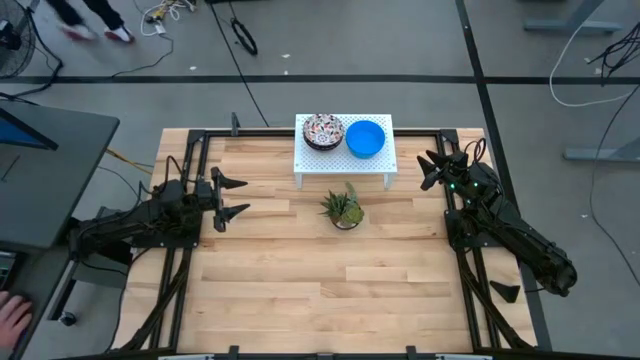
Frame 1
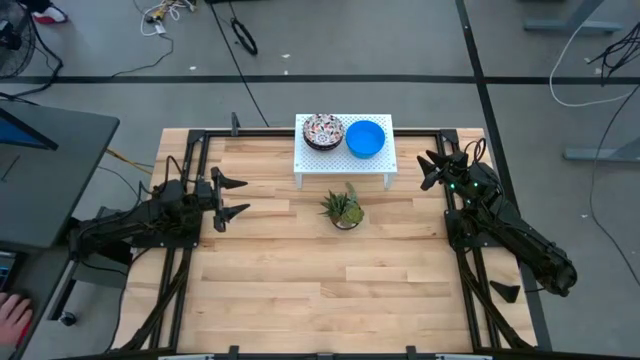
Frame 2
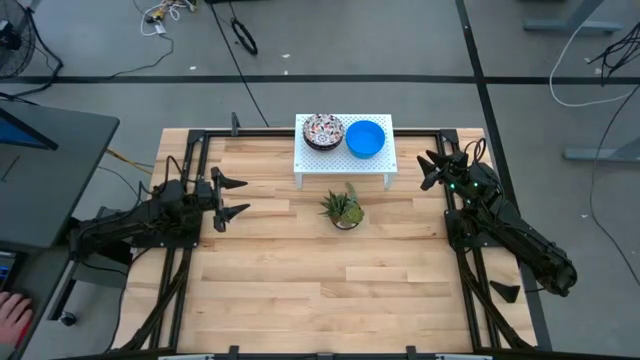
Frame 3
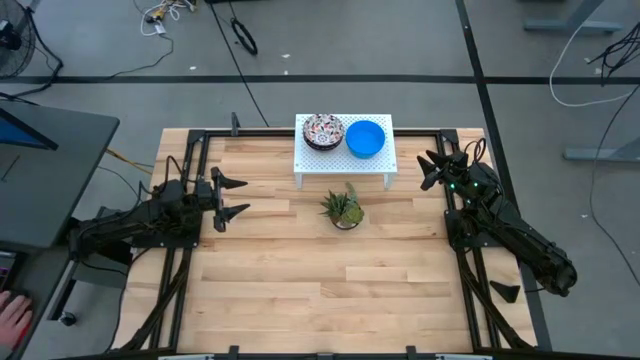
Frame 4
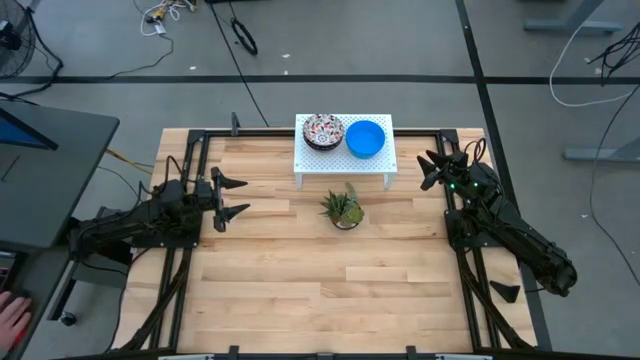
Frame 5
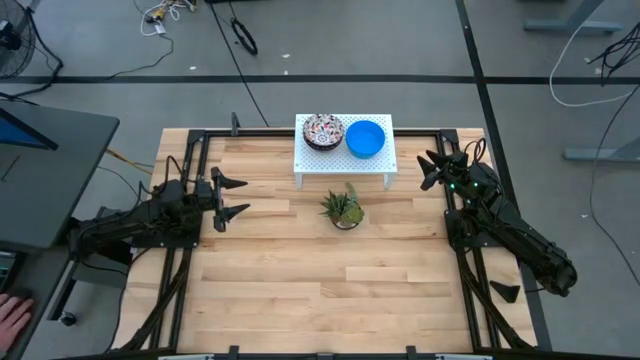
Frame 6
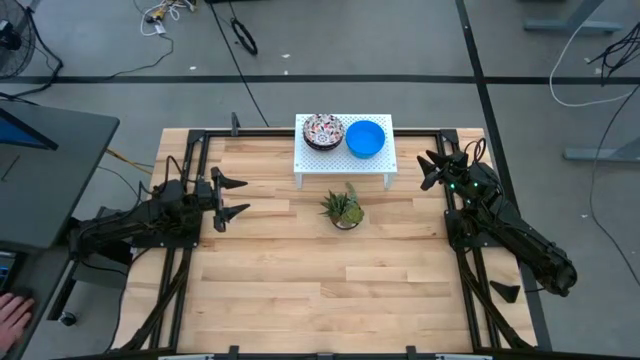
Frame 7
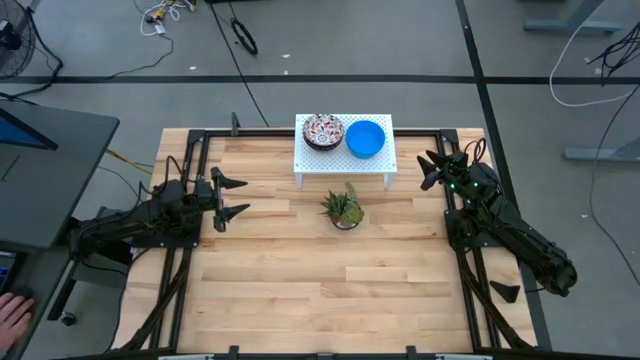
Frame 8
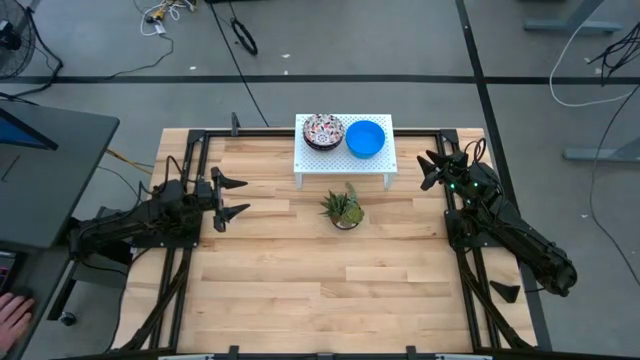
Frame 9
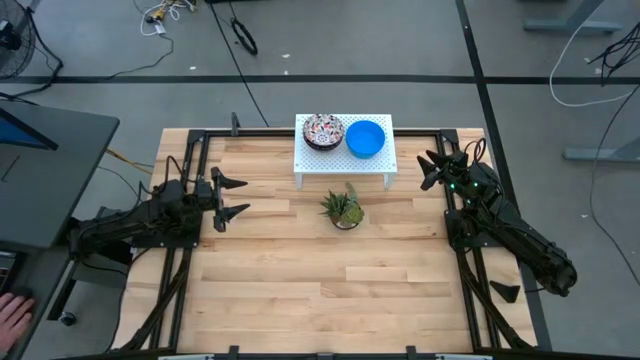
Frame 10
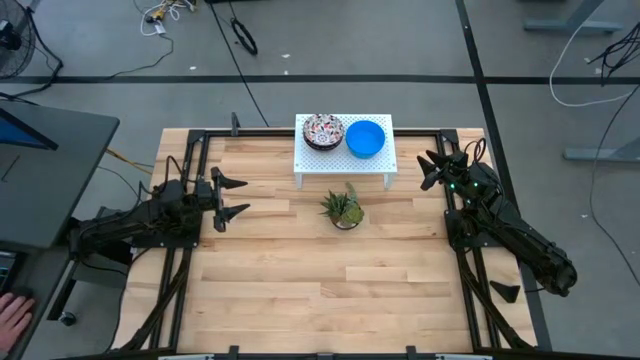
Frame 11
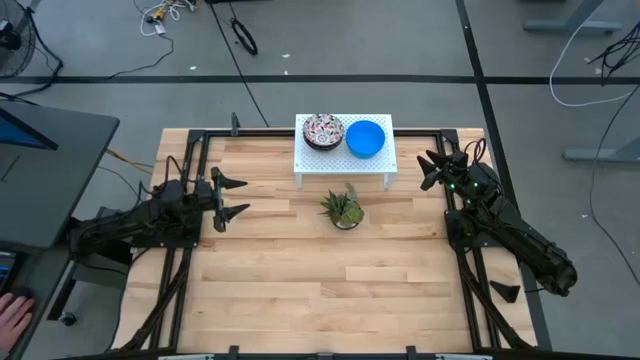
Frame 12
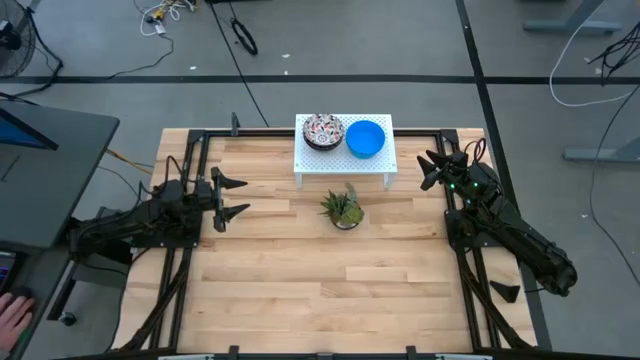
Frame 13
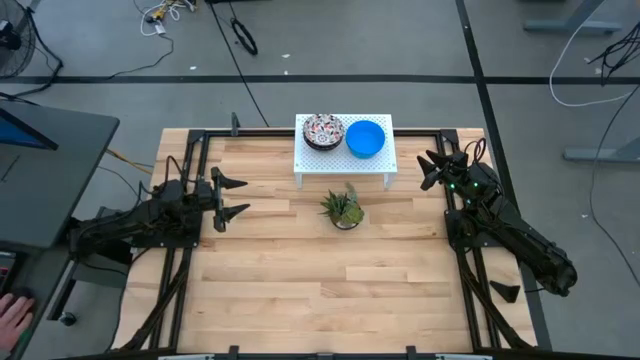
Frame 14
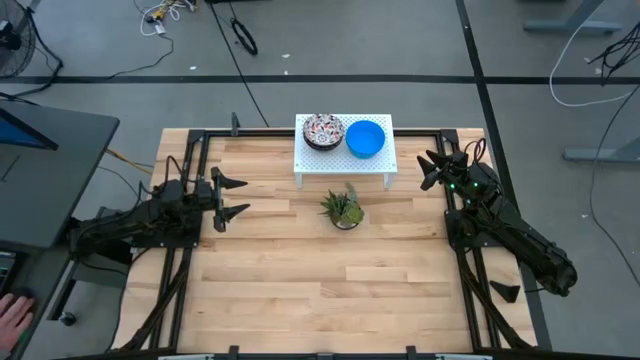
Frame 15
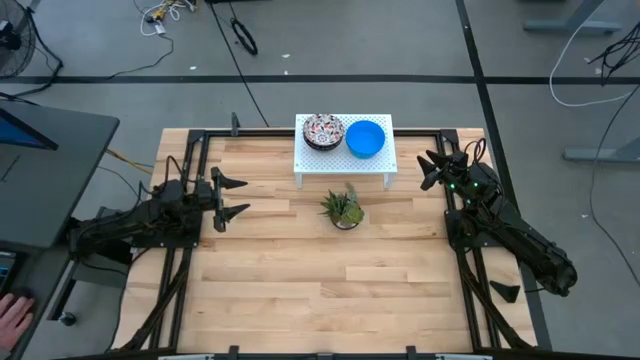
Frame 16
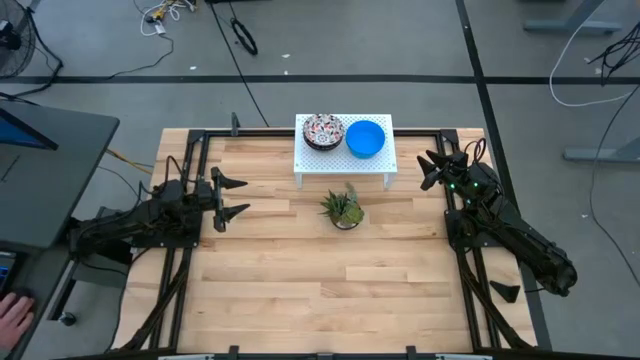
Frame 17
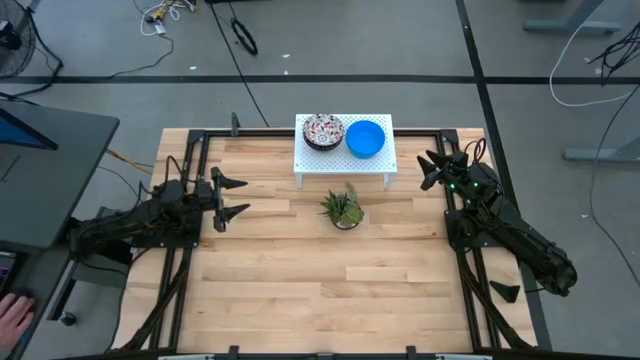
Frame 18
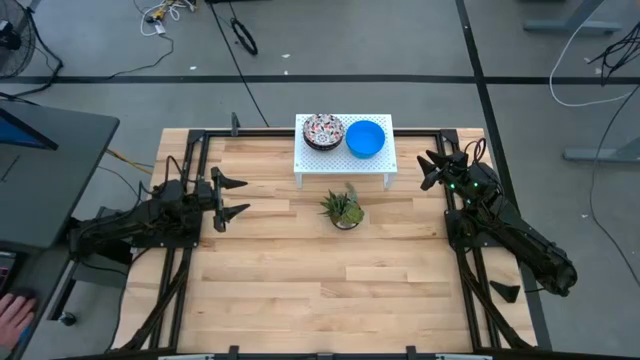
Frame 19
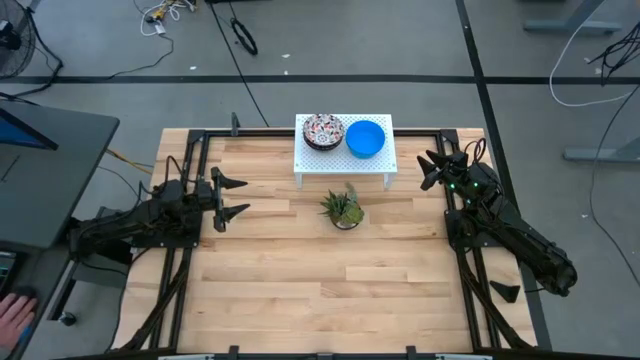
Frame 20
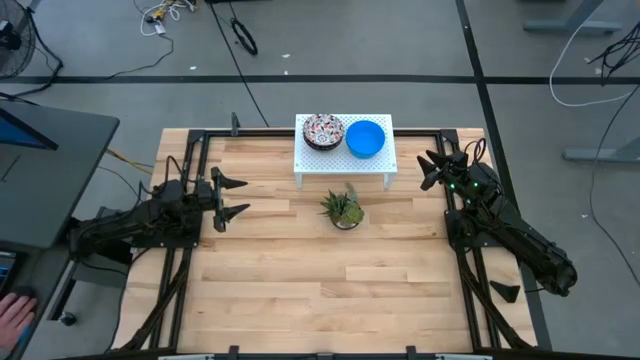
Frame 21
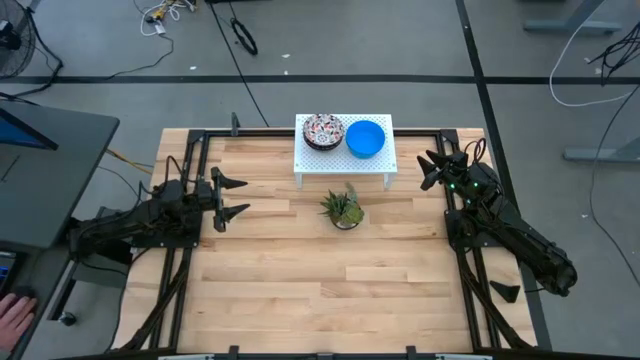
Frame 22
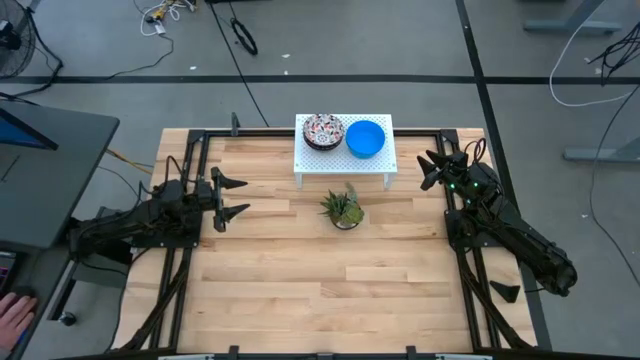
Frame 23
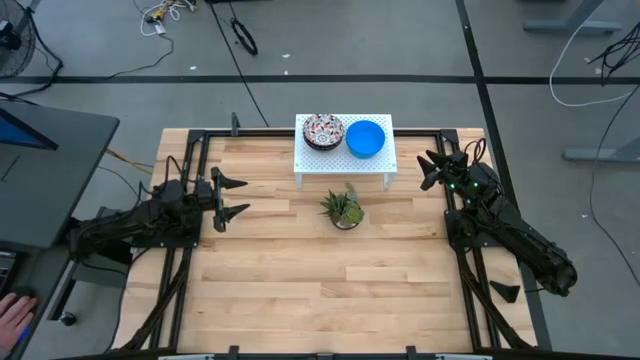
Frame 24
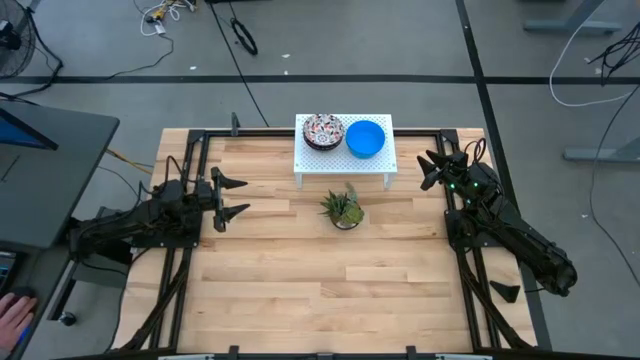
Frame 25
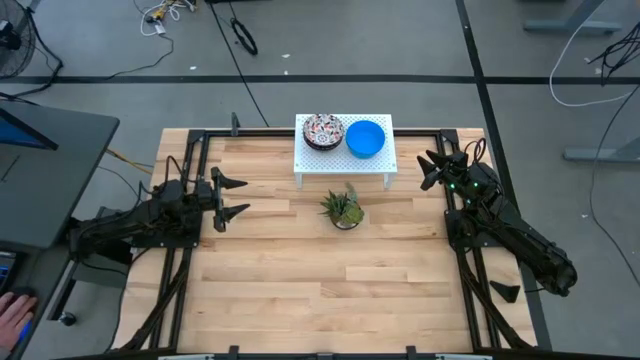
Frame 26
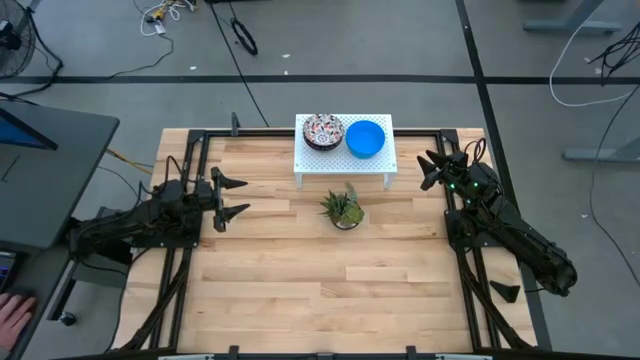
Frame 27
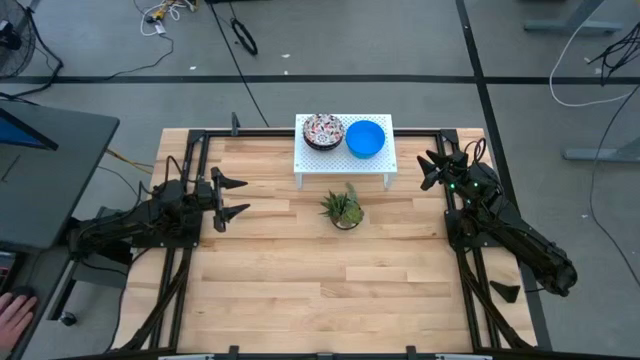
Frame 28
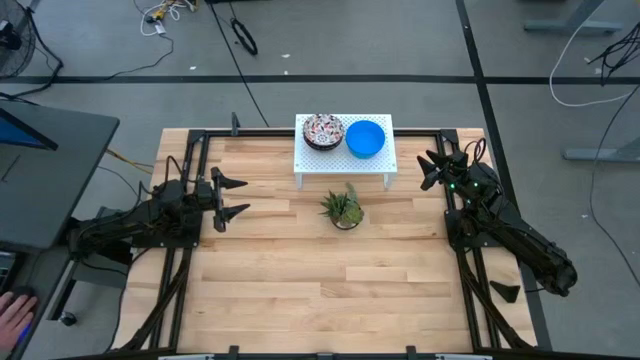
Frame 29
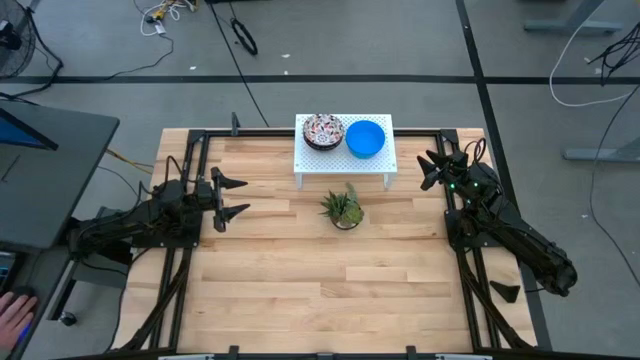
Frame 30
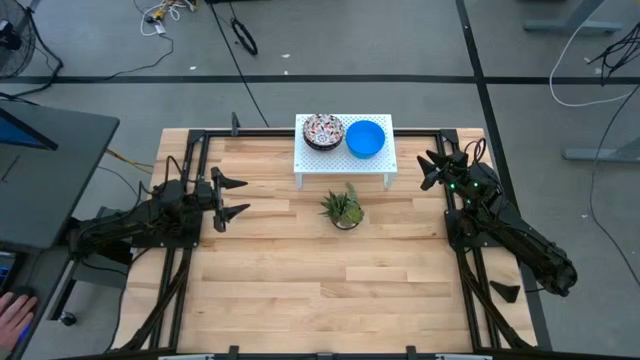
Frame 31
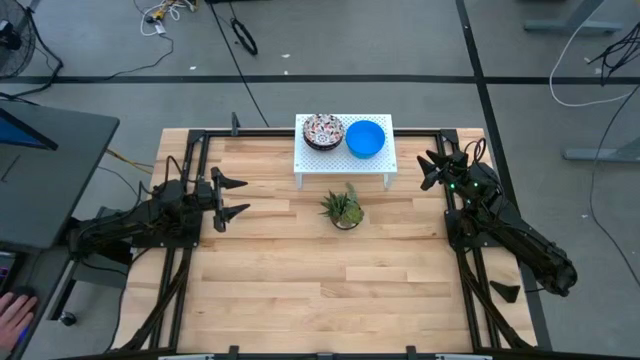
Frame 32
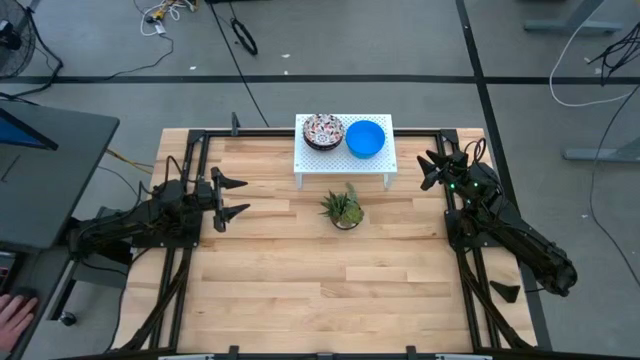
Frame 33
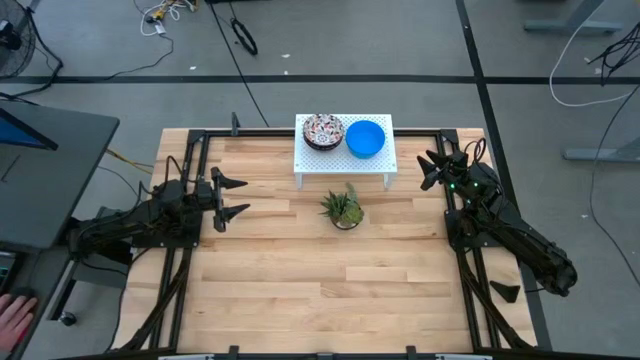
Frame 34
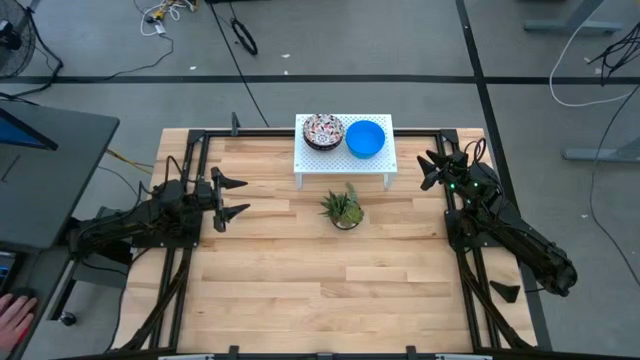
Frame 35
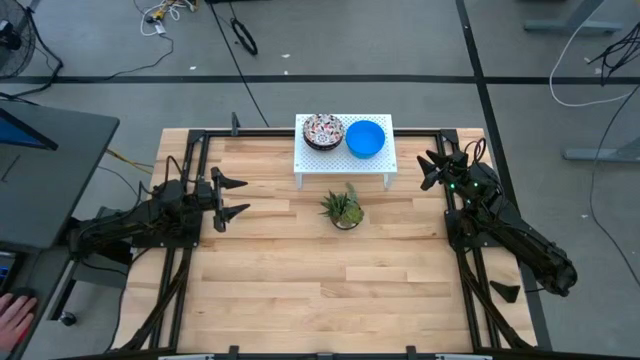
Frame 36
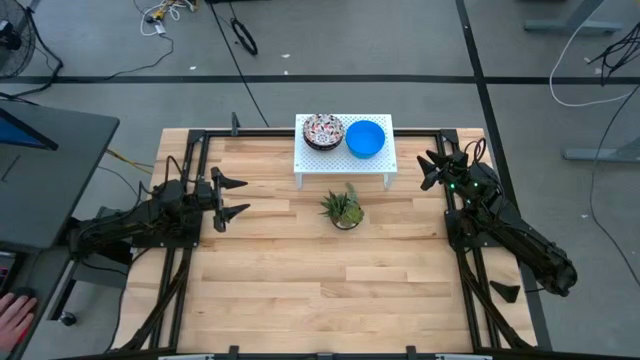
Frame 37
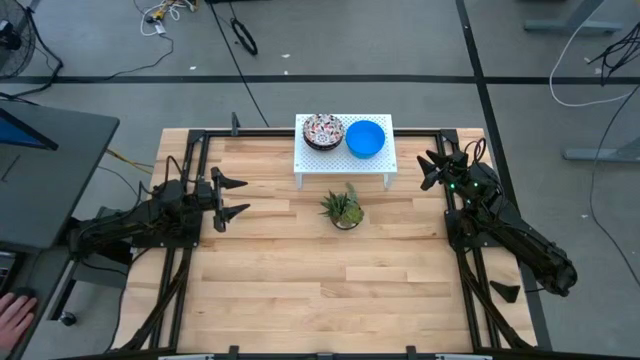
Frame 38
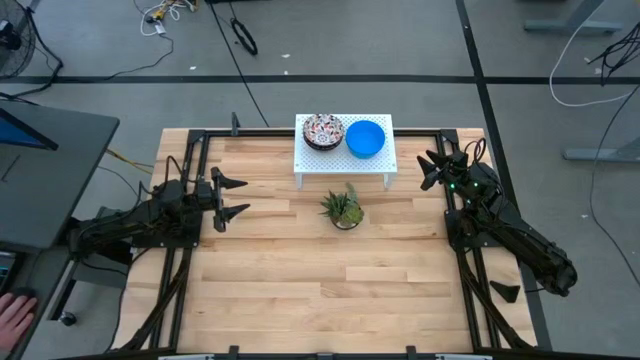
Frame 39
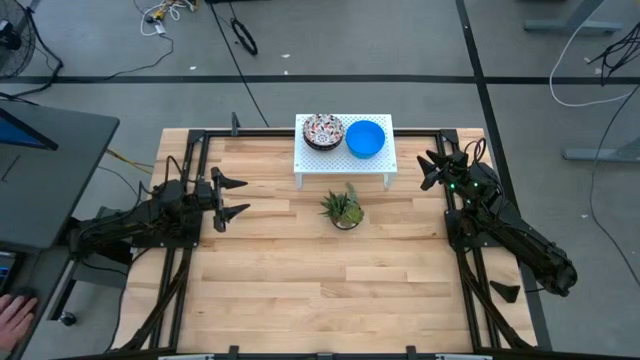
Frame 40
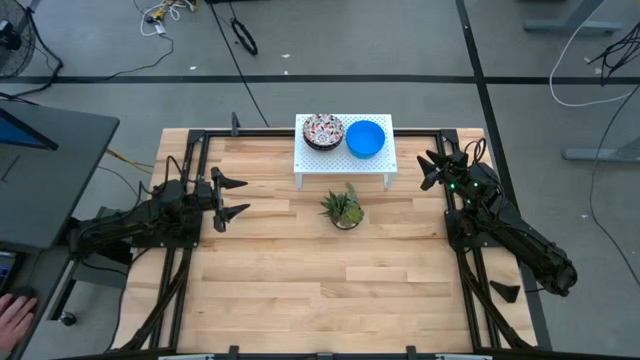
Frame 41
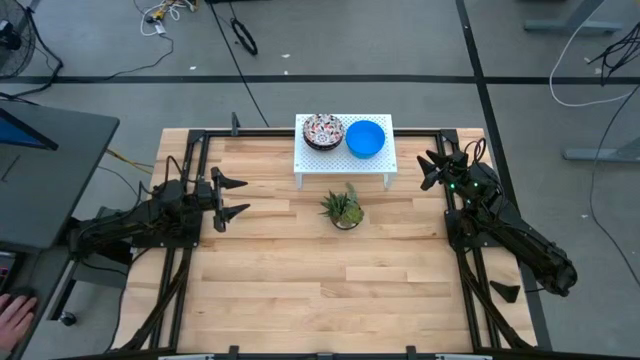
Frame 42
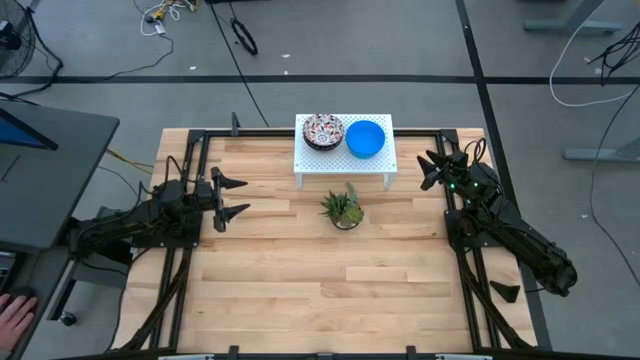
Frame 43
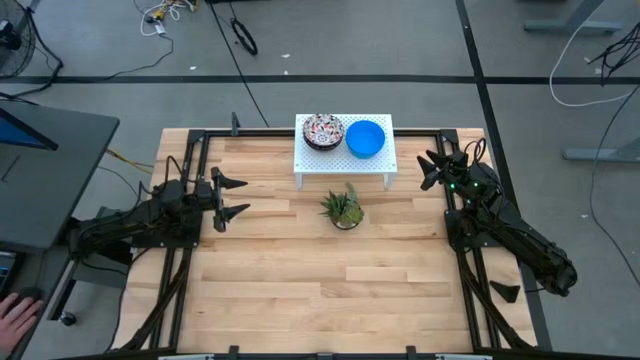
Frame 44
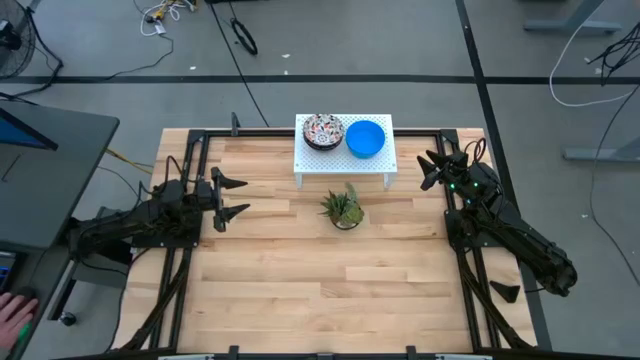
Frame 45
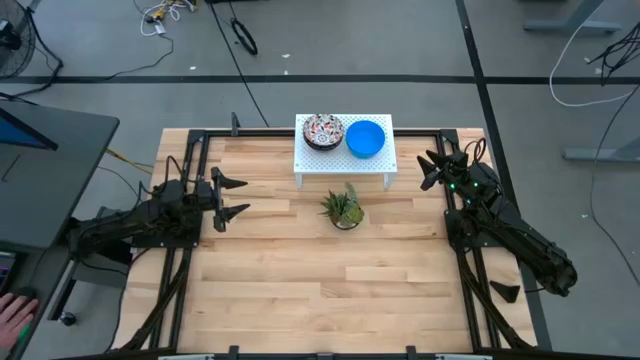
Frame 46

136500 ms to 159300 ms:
Task: Pick & Place Mini bowls
Return to Home Position
